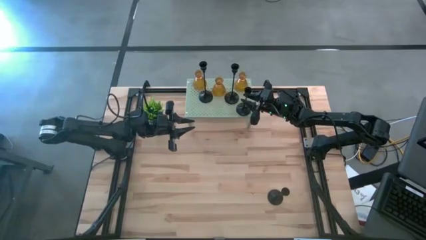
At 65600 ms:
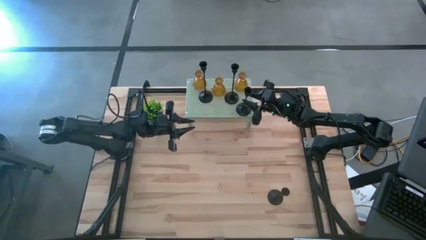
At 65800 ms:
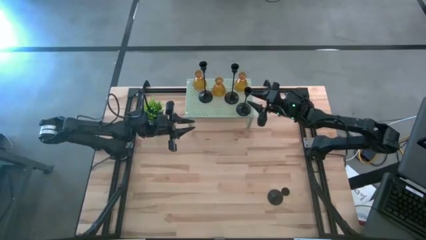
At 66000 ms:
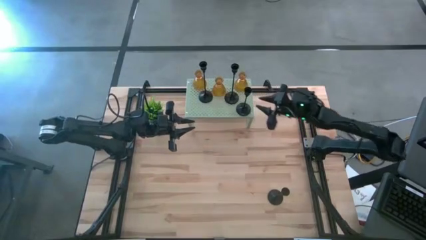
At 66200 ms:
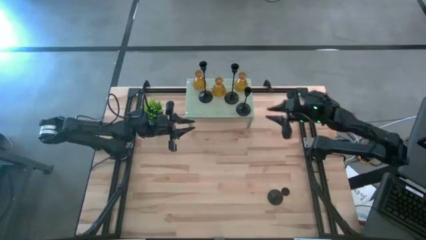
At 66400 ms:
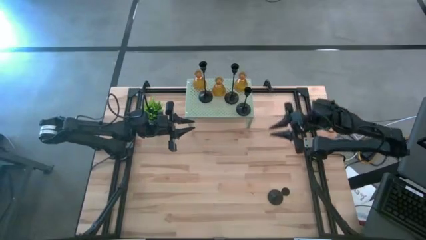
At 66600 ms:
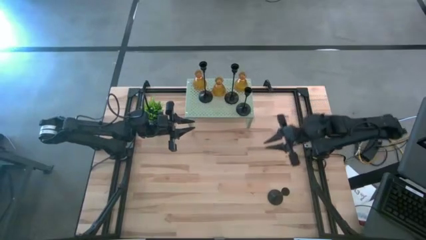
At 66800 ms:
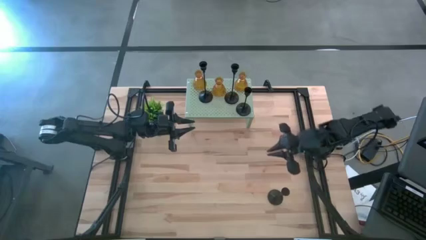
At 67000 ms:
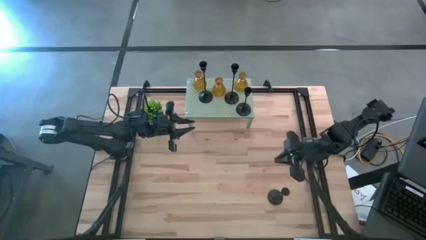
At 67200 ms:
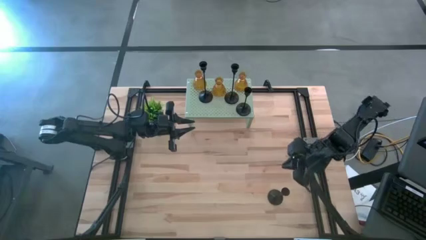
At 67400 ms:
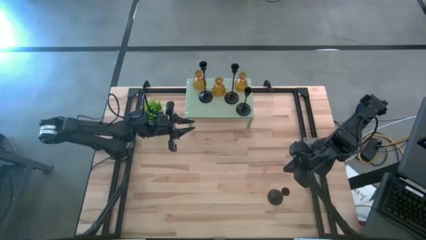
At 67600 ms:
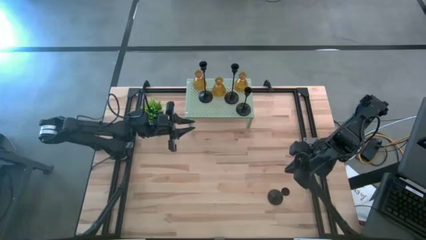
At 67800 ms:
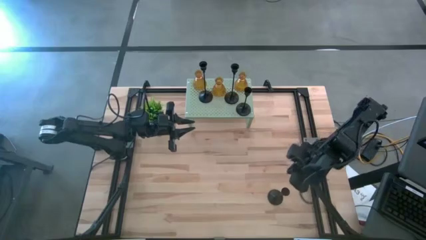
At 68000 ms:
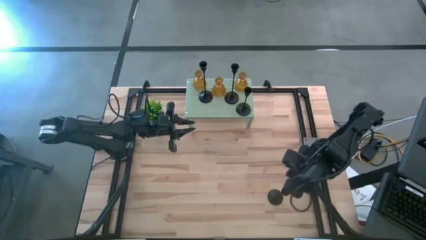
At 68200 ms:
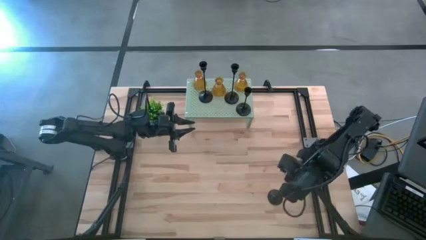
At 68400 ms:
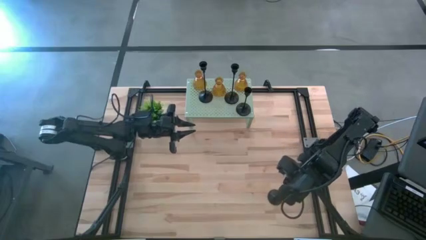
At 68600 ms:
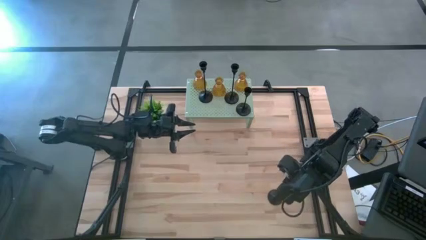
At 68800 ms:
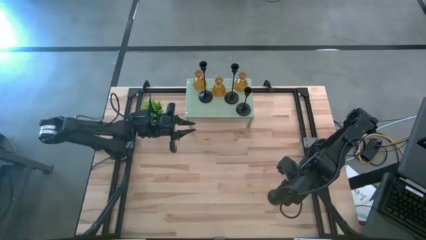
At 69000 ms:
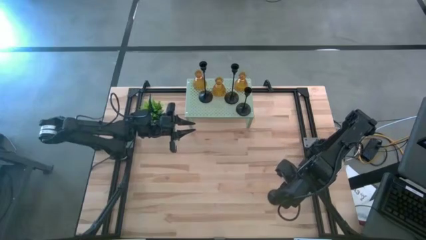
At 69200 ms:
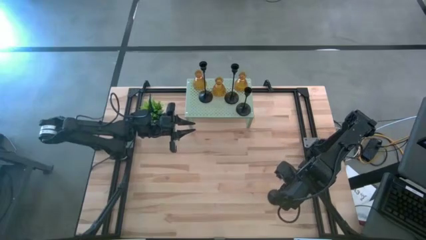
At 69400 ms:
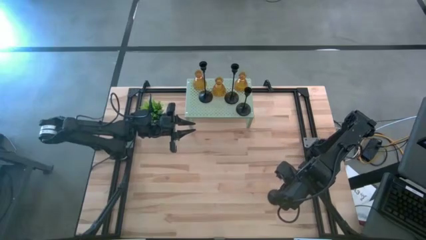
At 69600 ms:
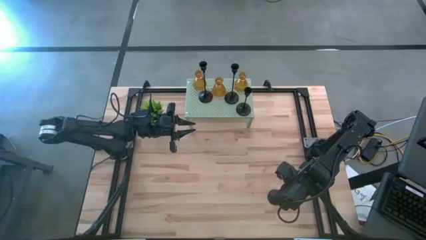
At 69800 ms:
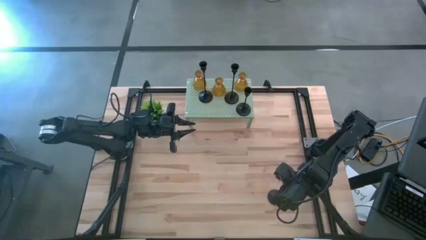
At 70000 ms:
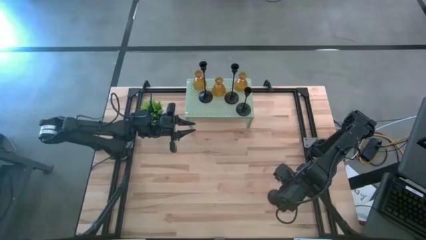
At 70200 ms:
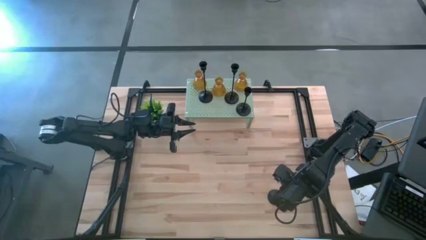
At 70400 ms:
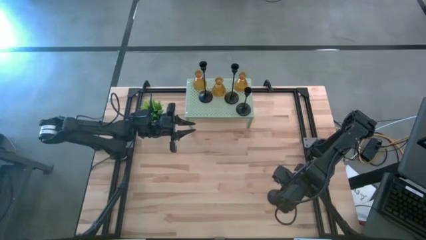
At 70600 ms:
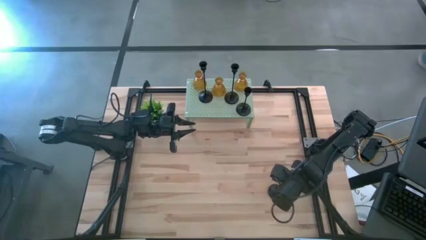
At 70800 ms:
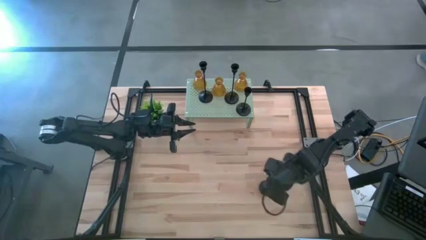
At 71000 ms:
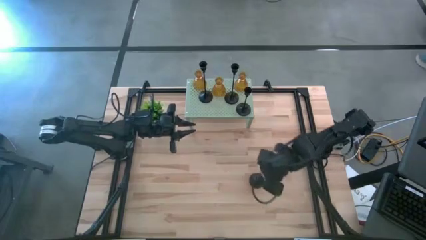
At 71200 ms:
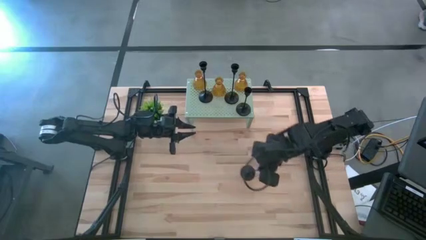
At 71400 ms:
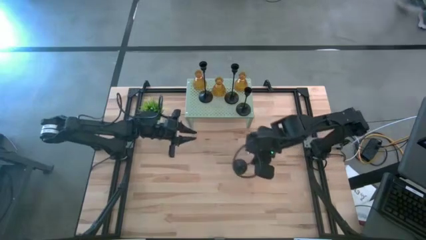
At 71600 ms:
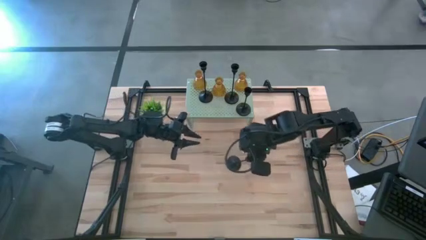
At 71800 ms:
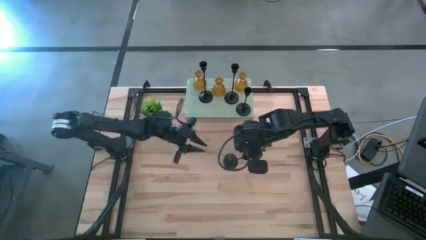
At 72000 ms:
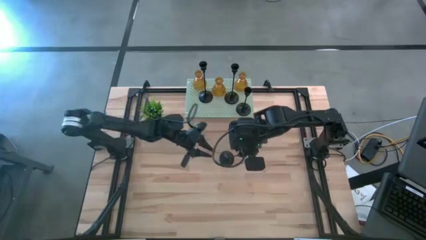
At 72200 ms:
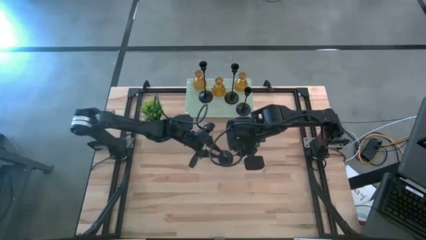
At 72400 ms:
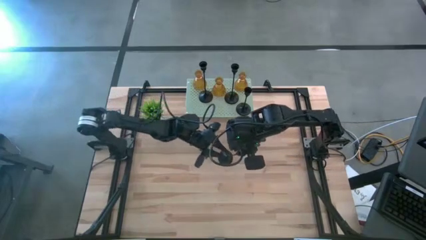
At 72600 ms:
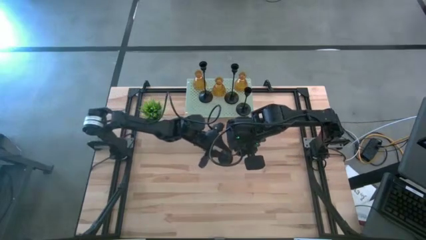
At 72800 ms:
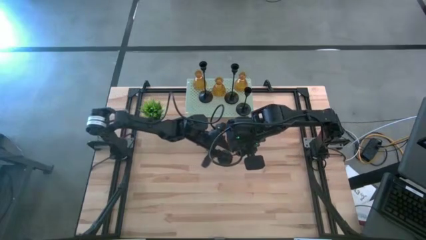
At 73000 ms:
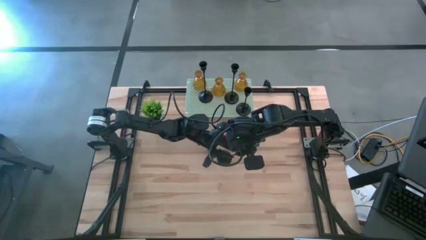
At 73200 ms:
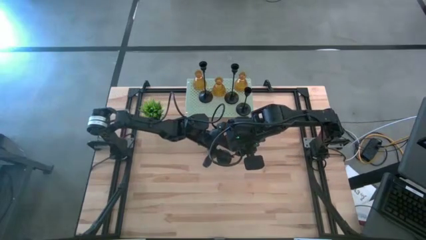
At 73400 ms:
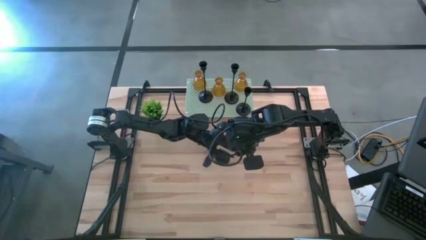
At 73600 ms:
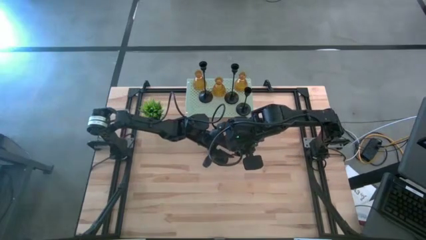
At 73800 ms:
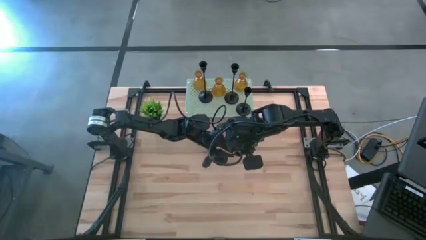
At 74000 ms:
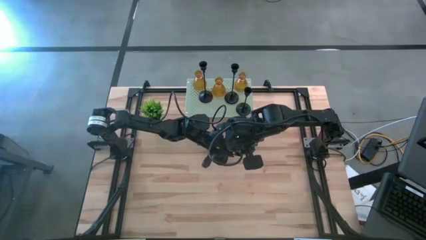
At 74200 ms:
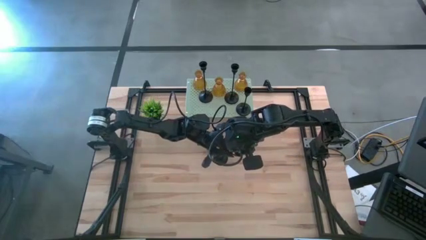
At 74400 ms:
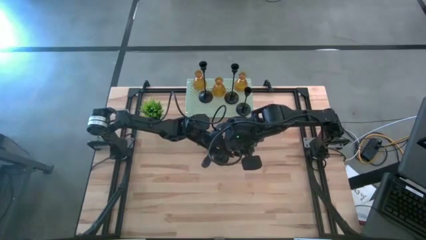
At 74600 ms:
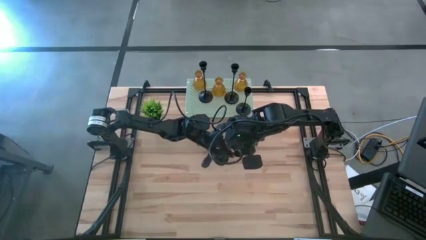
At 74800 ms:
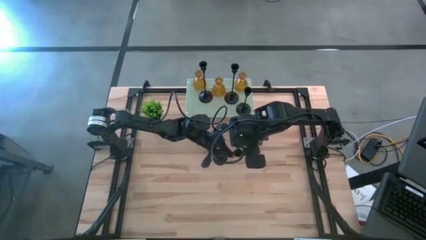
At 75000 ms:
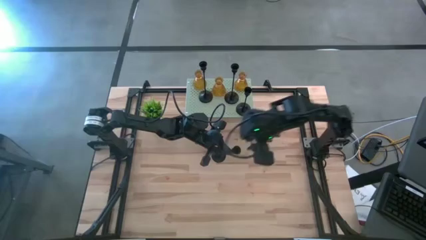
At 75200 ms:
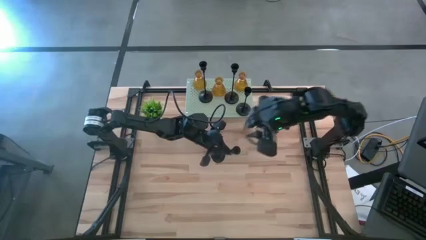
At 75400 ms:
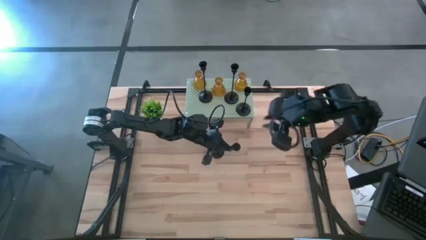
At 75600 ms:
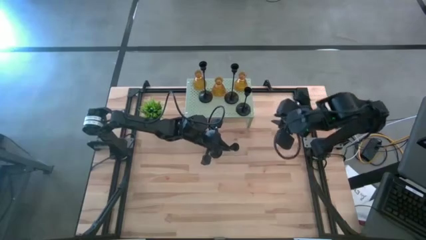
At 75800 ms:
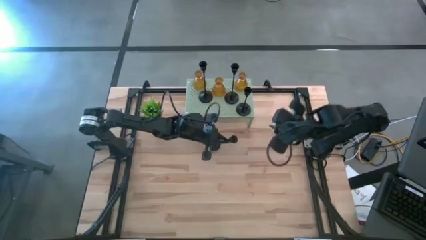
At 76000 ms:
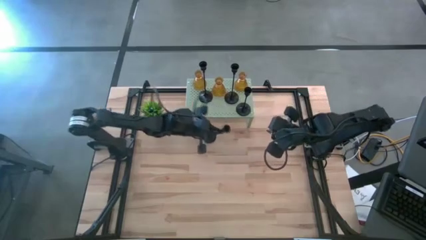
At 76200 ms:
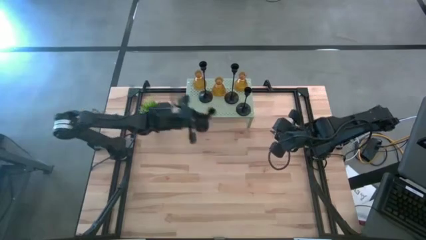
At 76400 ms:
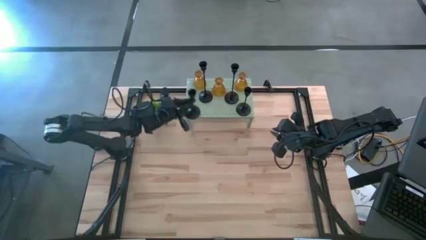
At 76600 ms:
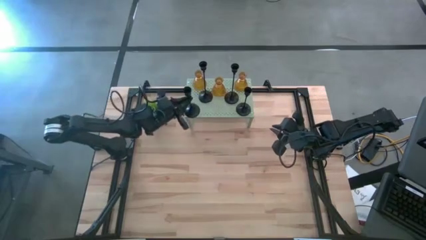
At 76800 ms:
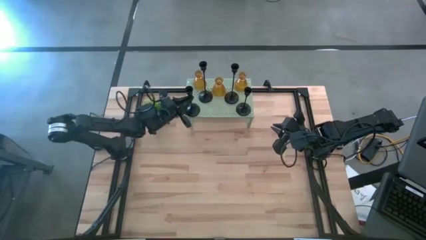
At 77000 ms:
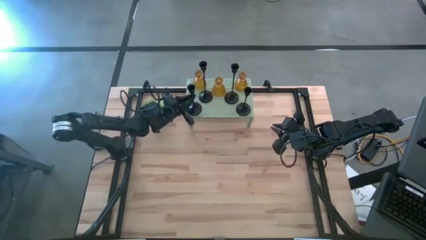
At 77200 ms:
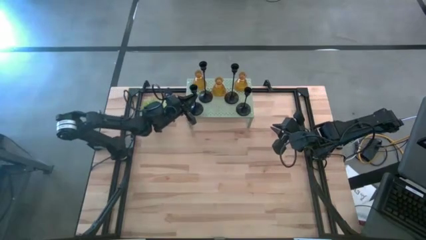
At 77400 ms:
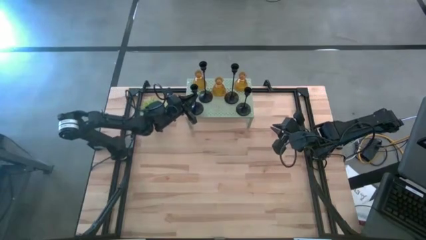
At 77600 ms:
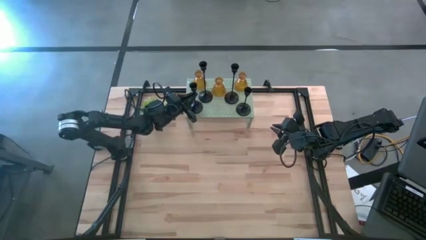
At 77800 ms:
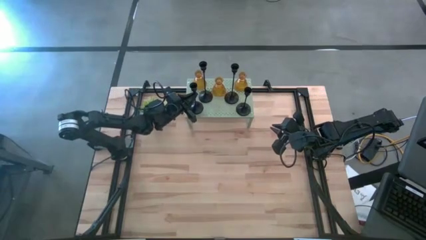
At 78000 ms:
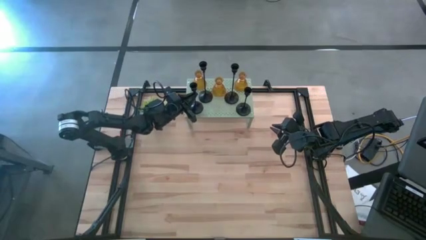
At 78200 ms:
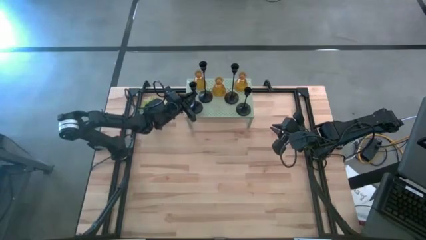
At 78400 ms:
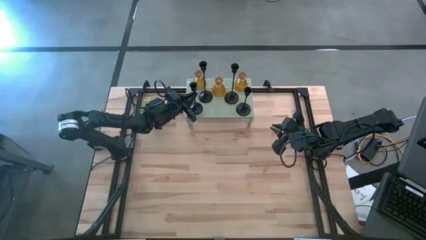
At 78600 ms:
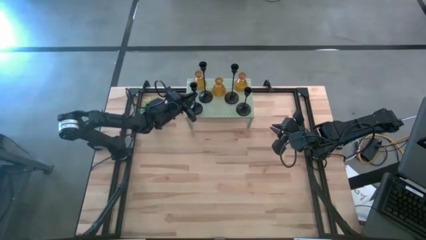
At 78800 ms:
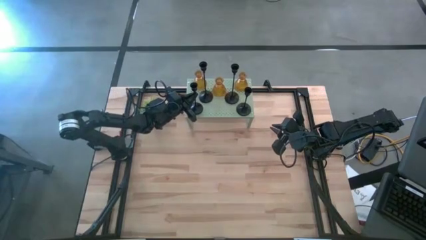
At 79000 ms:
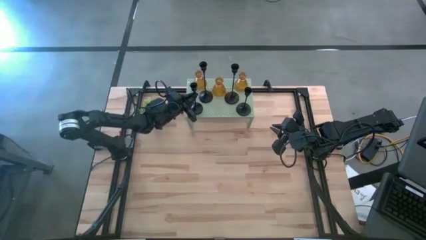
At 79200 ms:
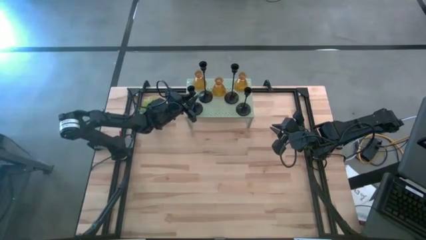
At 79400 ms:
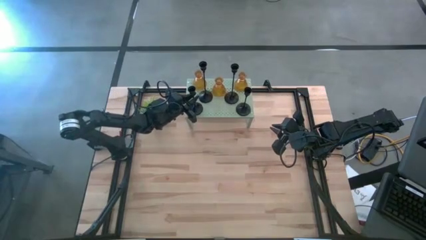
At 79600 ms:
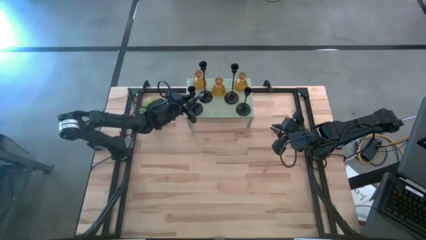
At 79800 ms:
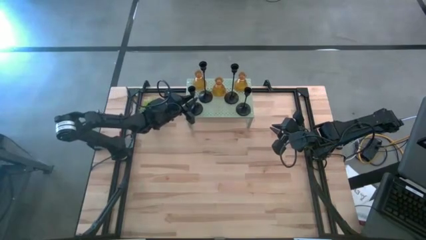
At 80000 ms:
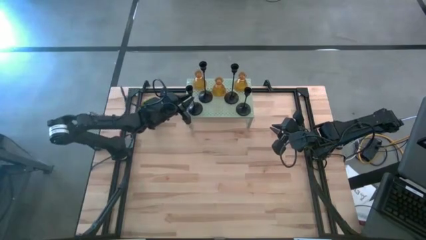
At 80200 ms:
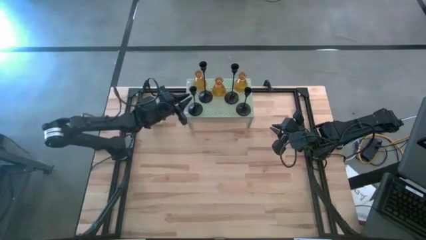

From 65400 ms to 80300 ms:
Task: Pick & Place candle stick holders
Put the black candle holder on the shelf

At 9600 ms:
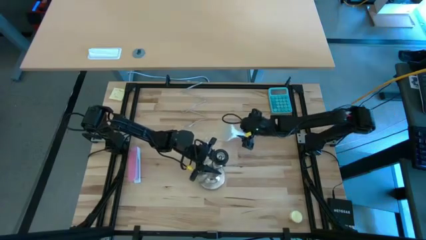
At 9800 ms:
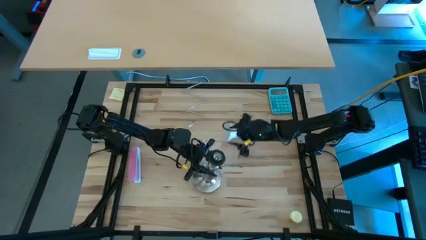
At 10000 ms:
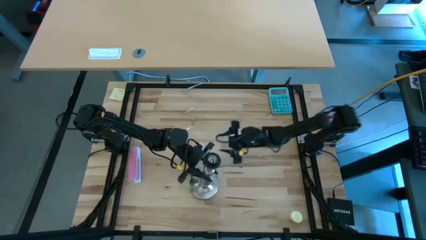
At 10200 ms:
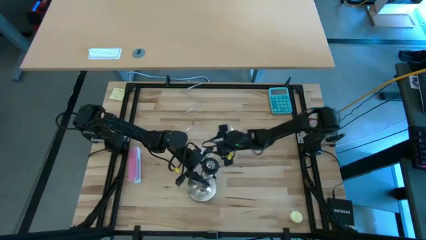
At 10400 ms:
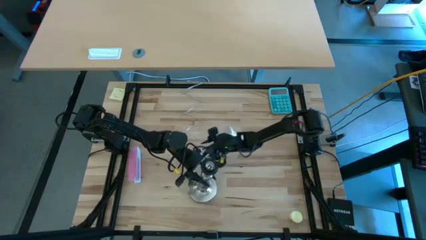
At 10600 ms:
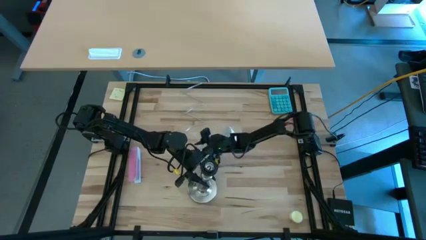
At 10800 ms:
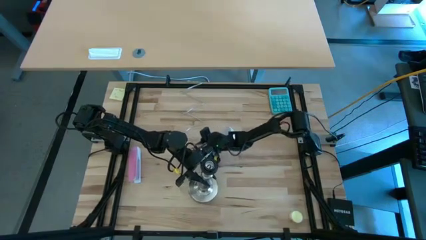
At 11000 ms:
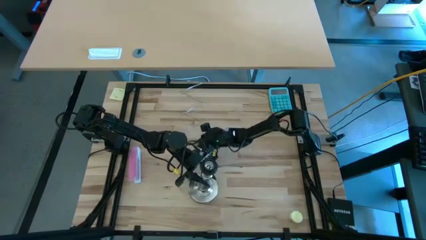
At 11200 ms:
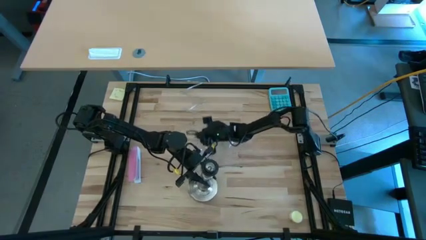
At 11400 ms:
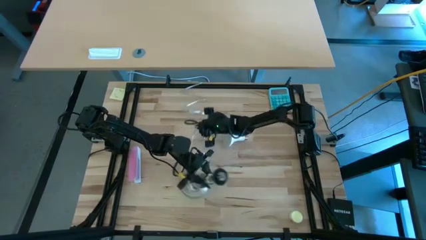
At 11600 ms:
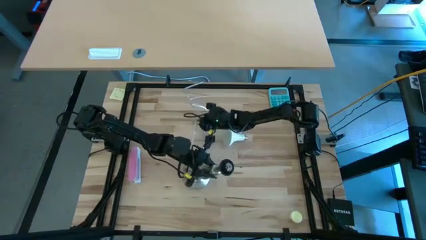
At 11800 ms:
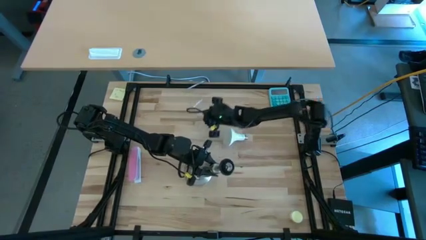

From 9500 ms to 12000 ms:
Task: Screw lightbulb
Adjust the silver lamp
